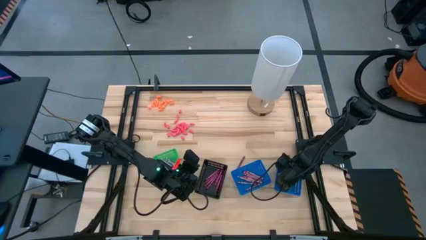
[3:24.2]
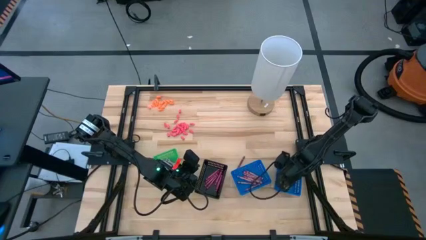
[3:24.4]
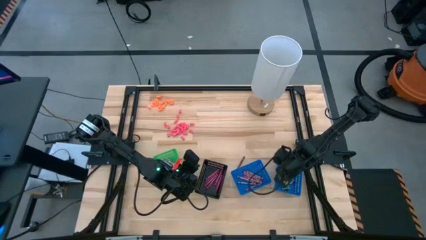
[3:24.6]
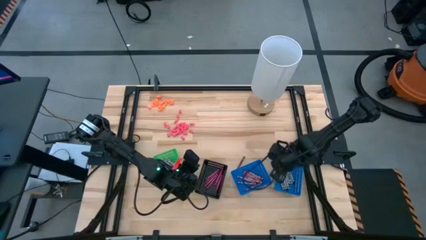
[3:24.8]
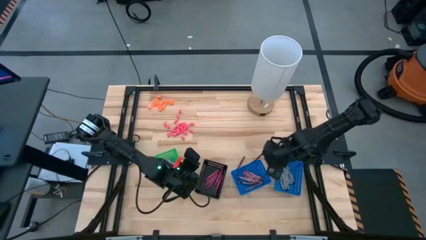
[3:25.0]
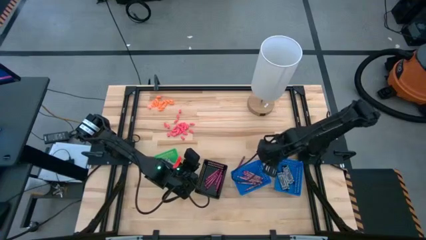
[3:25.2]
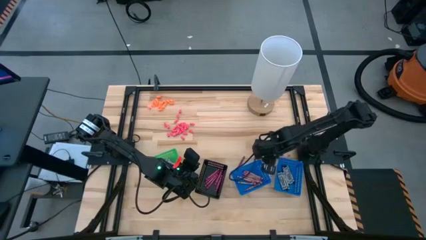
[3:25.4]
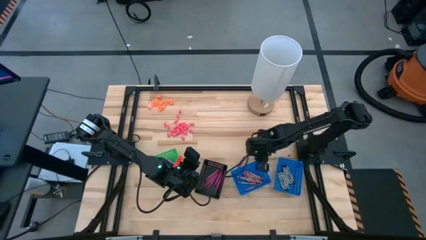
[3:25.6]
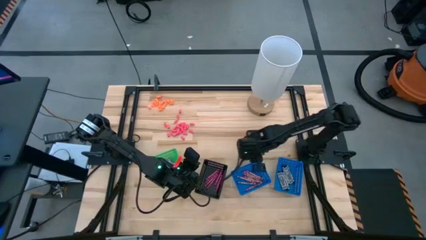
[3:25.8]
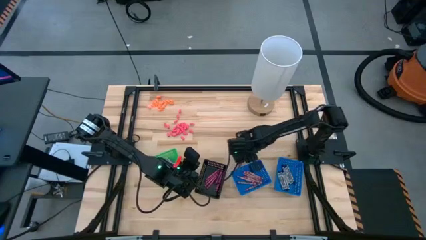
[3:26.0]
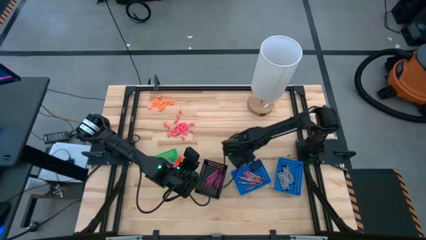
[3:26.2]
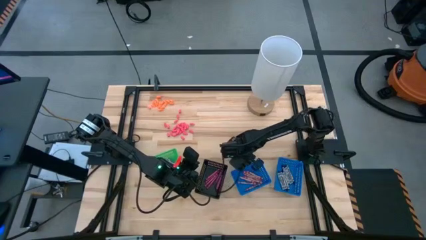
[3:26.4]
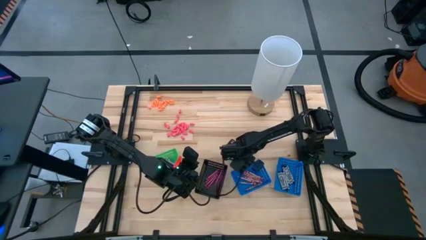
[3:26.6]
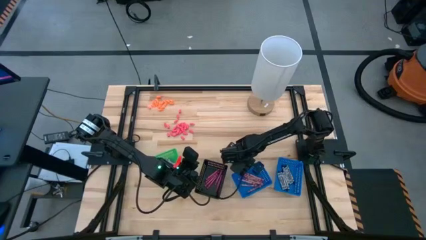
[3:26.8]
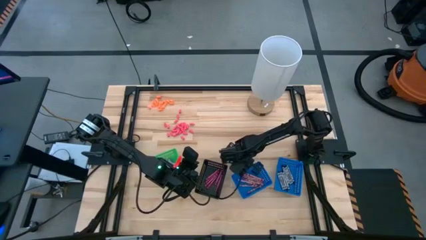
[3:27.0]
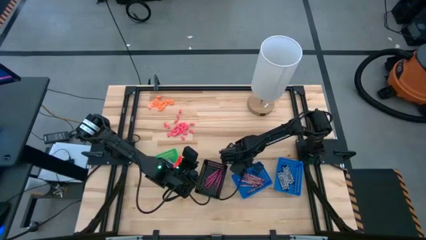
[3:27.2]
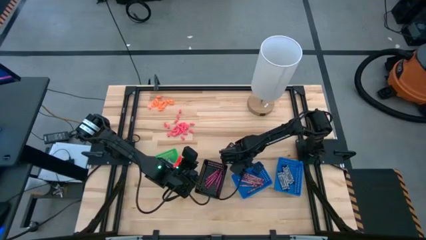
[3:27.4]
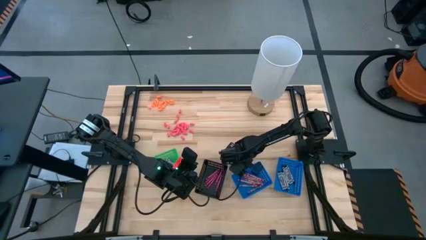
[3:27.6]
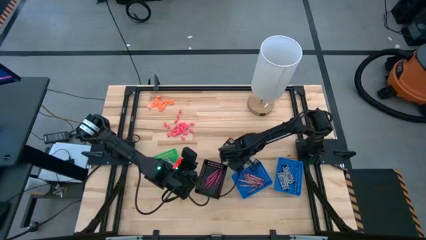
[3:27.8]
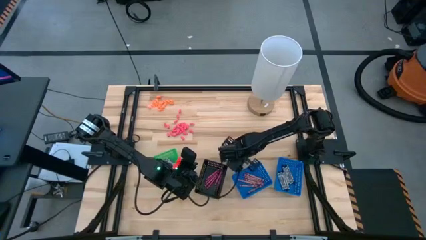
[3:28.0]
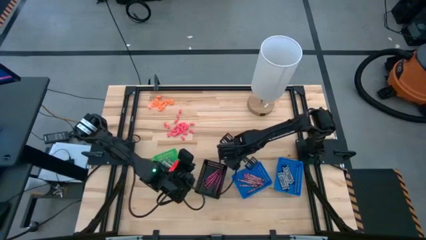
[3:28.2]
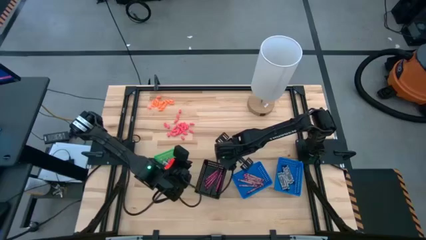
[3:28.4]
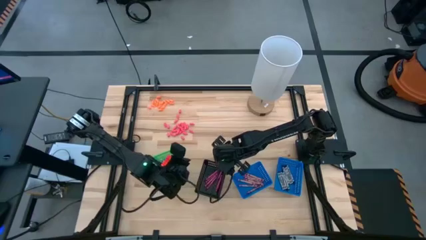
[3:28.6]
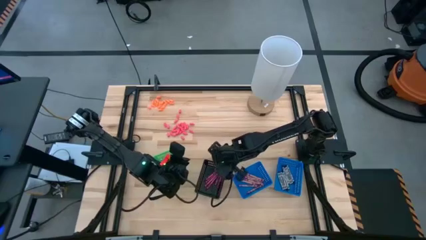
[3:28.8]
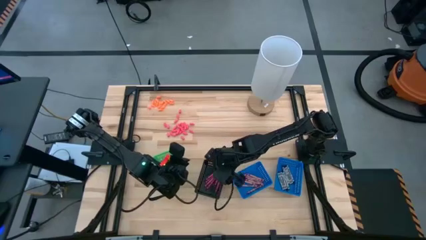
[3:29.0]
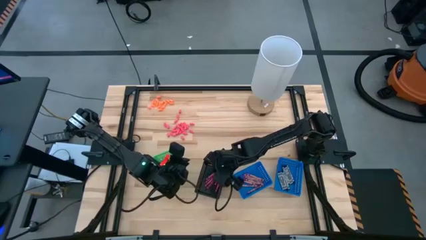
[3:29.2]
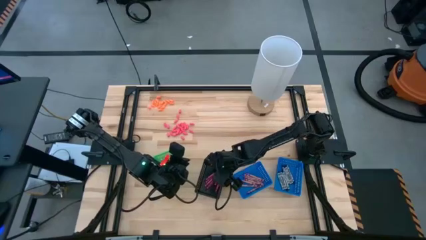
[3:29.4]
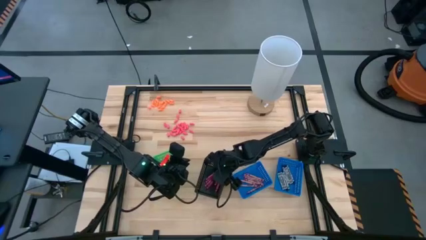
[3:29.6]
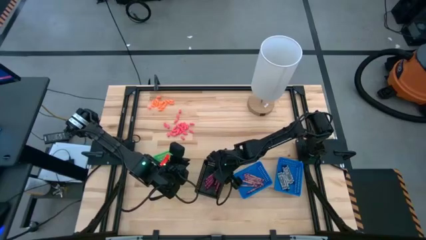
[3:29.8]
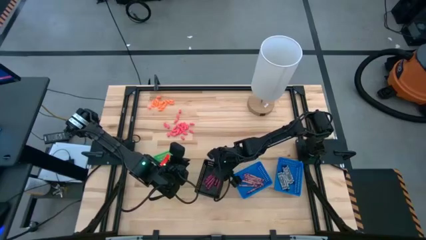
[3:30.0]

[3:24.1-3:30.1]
Task: Sort crayons
Put the red crayon into the black bin

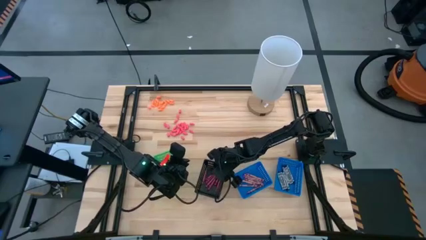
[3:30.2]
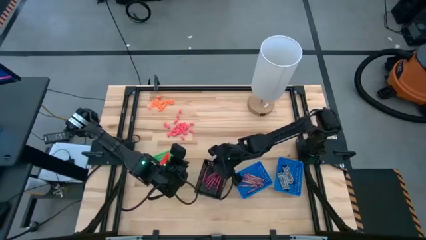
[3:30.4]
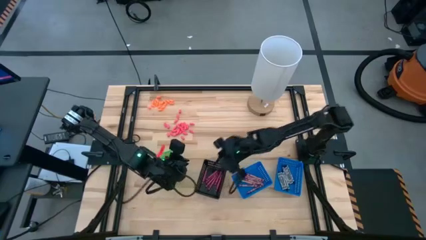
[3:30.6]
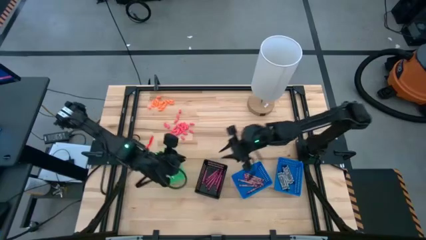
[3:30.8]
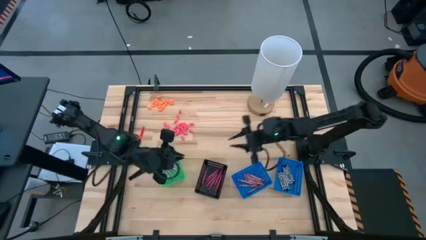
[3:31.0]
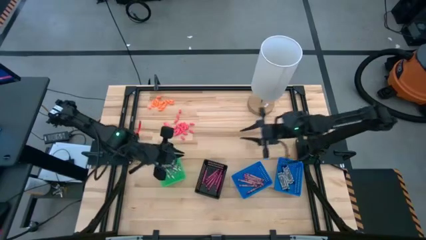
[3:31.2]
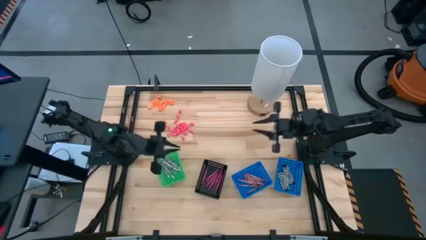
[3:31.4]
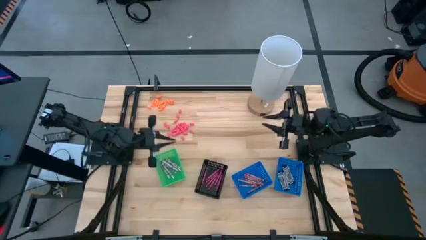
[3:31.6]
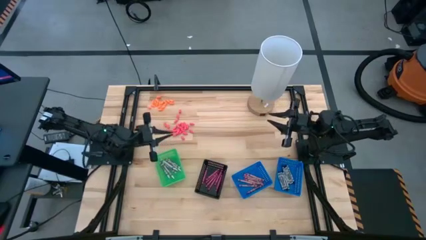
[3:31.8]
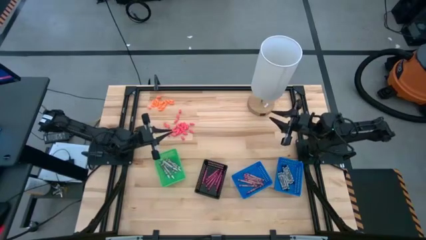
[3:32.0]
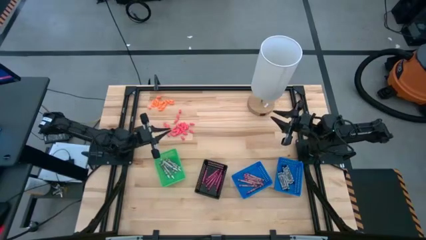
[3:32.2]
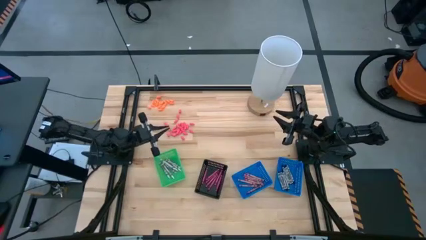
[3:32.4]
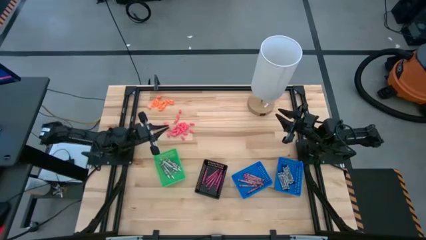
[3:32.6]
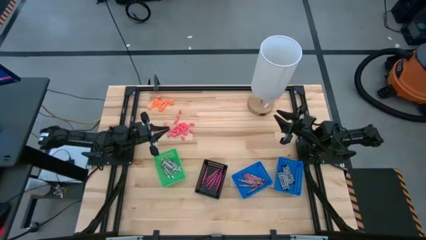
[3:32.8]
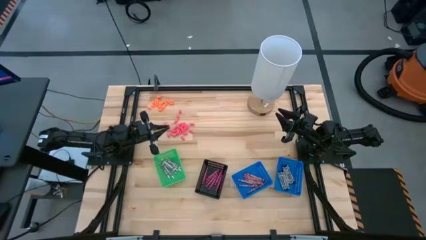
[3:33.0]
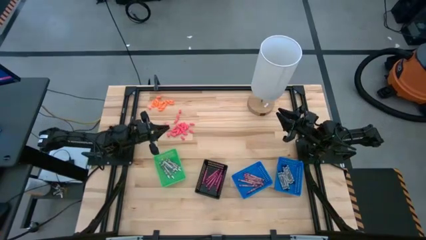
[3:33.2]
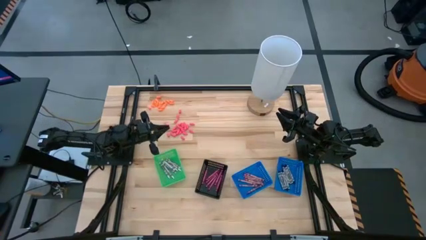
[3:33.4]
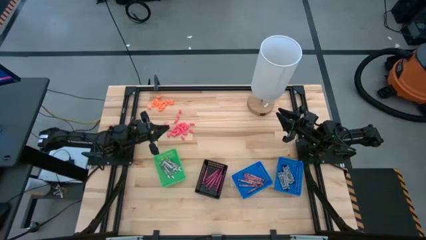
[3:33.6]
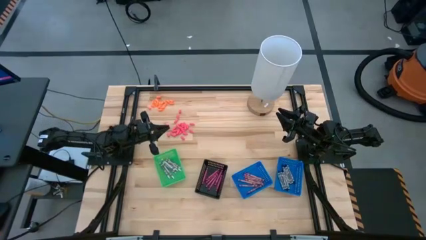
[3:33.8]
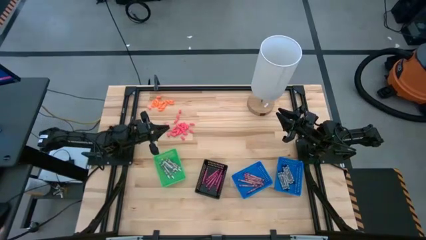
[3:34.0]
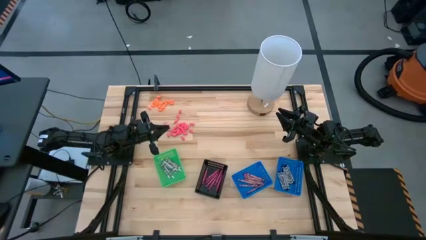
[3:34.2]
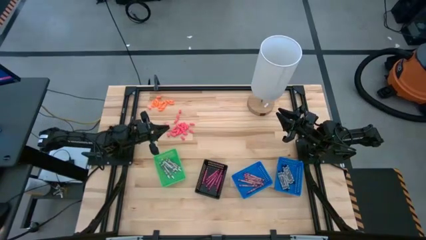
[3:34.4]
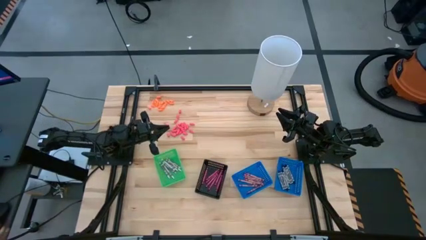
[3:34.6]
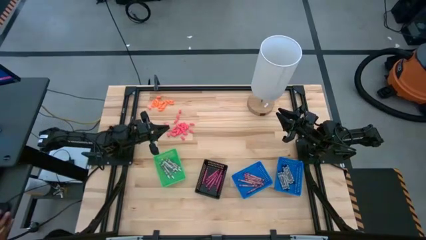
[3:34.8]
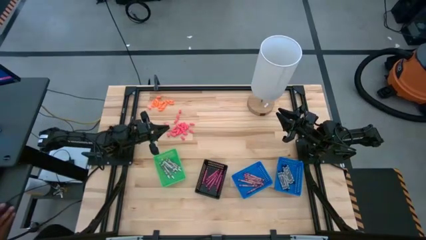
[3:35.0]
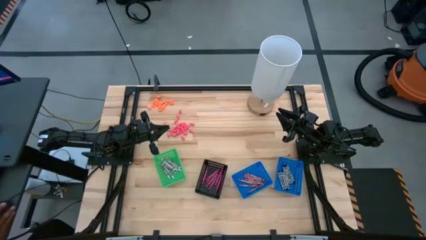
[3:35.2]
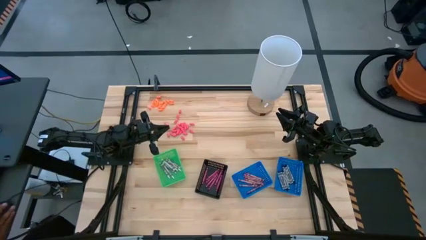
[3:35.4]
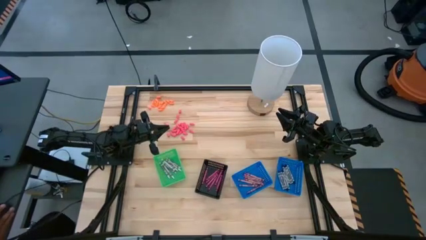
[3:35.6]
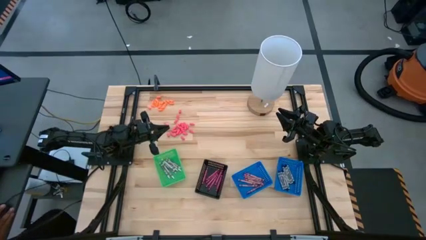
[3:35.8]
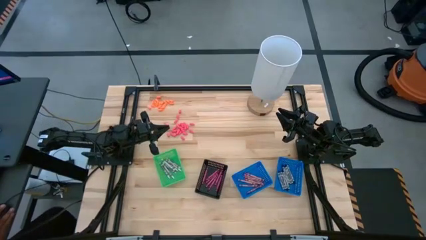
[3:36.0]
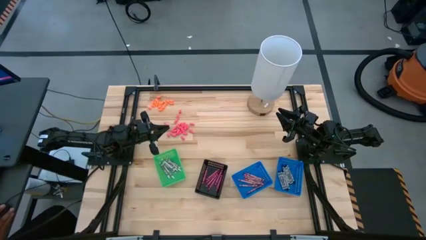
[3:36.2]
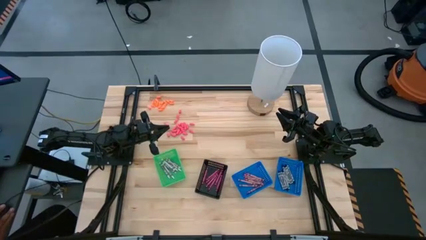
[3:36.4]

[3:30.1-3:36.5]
Return to Home Position

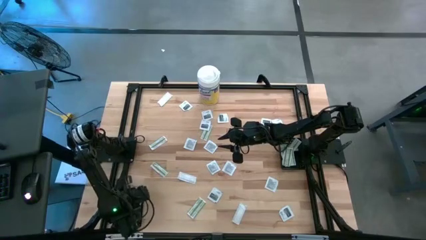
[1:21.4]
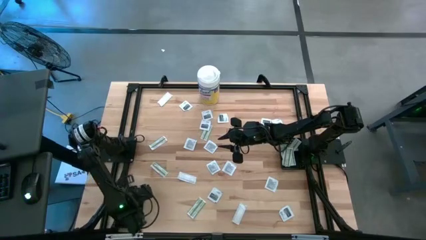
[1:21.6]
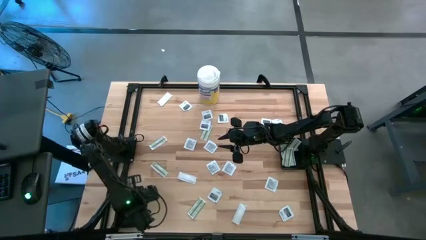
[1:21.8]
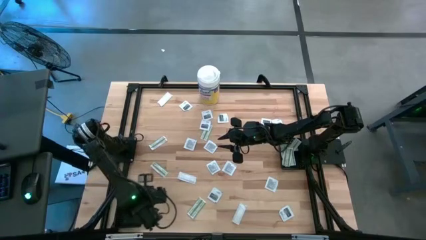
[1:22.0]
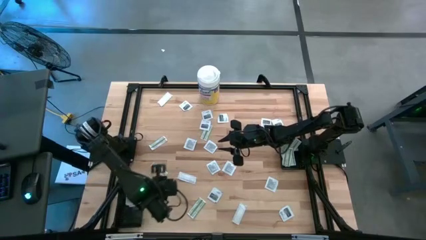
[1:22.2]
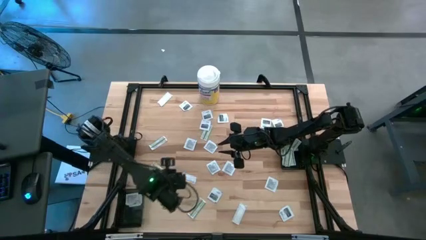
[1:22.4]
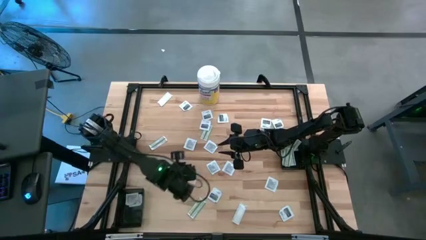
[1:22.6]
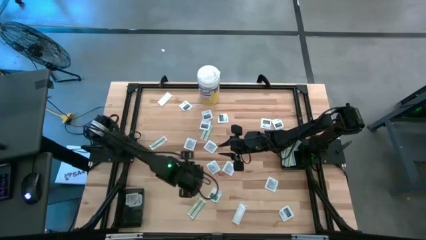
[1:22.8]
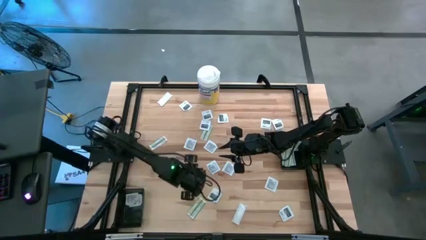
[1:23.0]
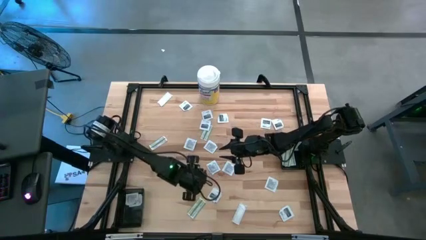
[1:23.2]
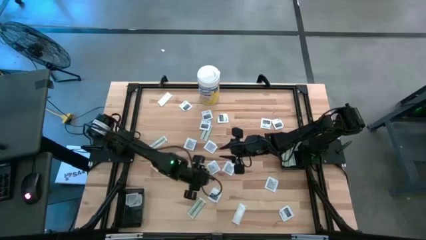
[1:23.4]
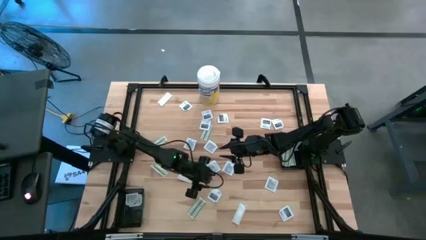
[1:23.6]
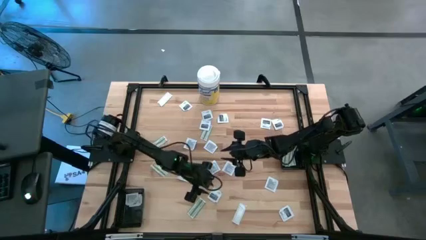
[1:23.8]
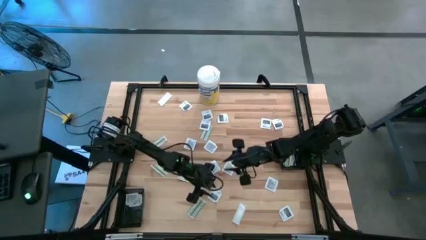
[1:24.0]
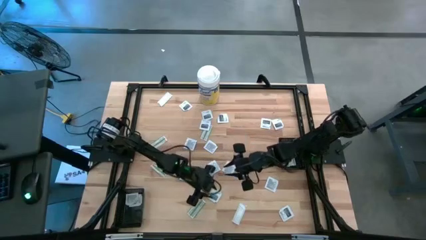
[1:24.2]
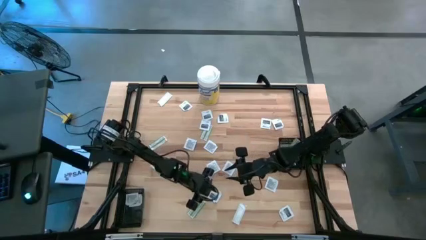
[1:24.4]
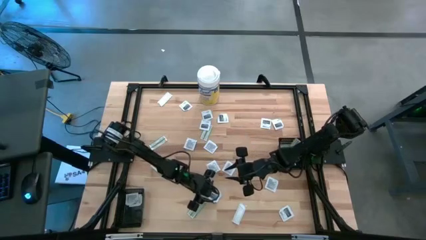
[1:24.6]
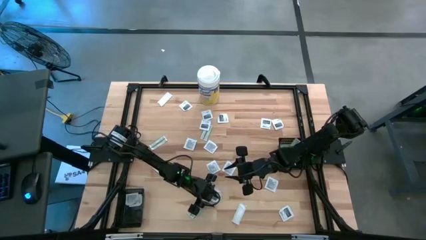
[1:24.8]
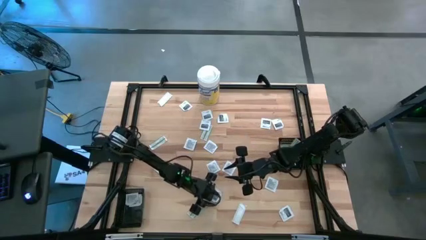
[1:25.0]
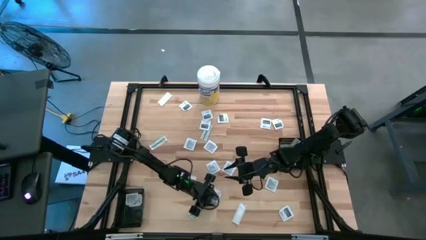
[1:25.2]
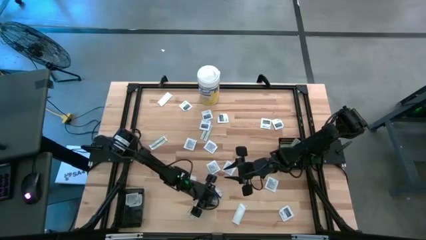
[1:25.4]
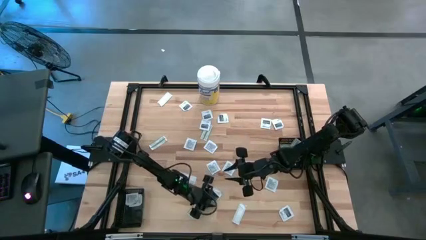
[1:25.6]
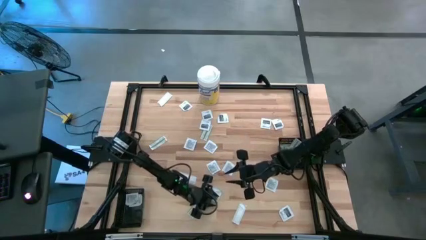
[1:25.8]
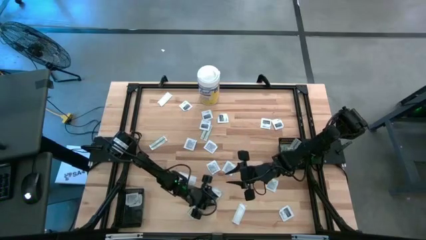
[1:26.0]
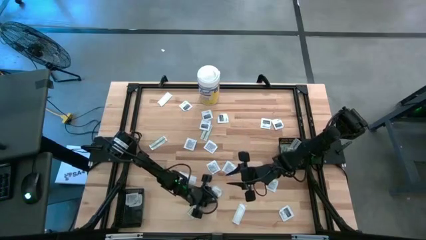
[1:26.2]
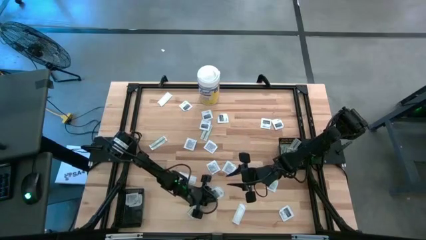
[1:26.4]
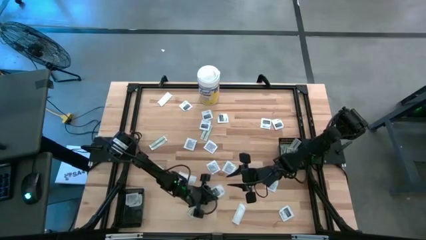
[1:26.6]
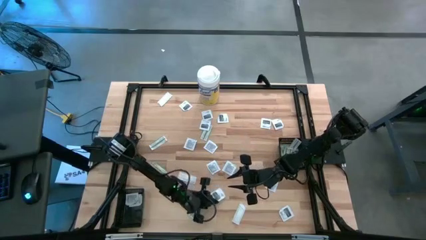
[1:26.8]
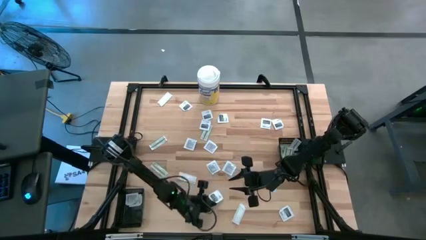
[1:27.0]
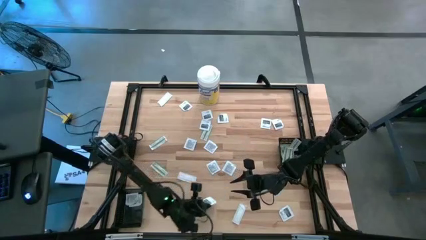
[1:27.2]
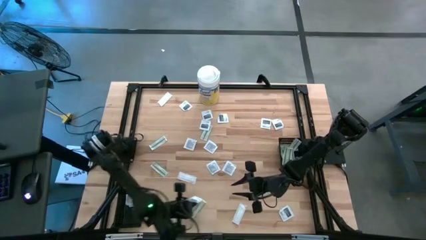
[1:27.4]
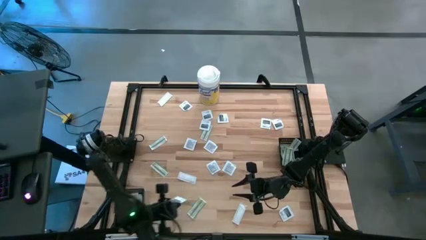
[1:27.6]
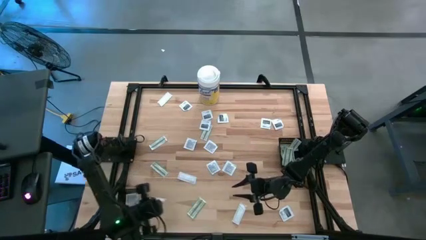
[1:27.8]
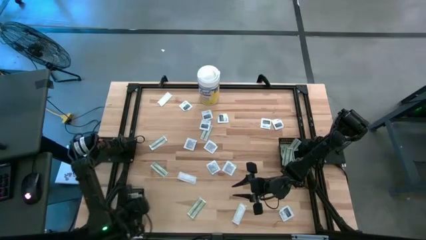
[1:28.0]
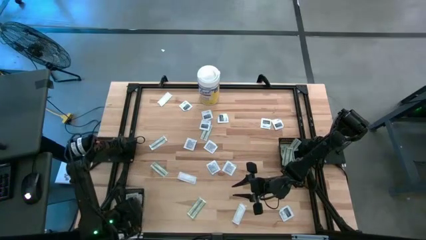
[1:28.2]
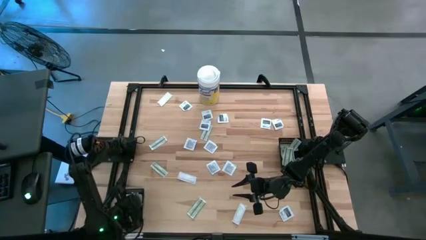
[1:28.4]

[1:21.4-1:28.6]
Task: Pick & Place First Aid Supplies
Put the white towelette sachet into the left black bin
